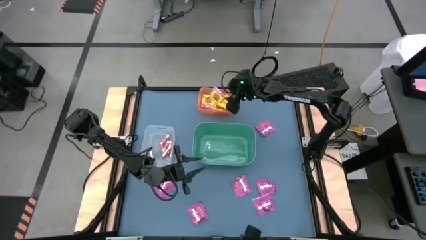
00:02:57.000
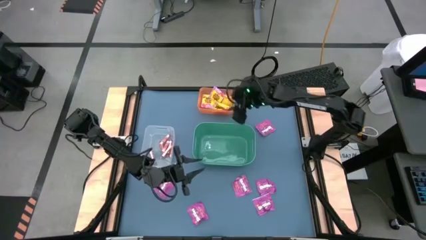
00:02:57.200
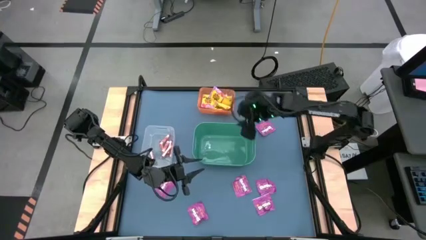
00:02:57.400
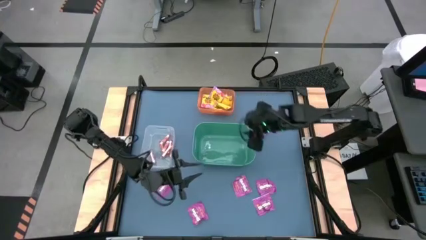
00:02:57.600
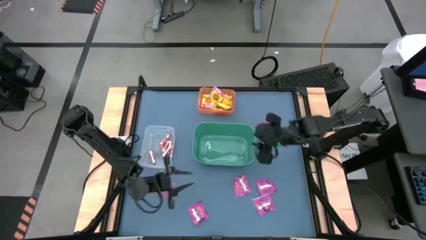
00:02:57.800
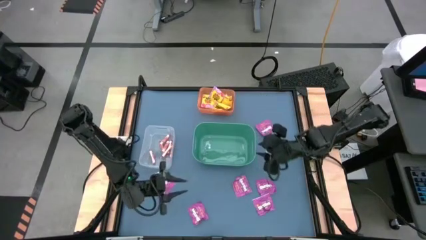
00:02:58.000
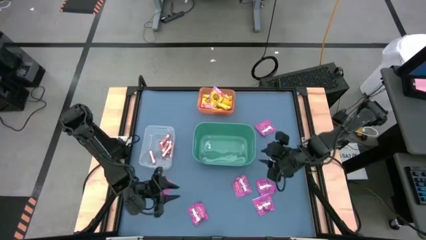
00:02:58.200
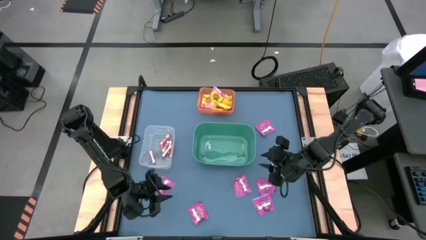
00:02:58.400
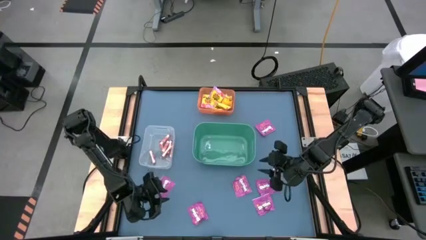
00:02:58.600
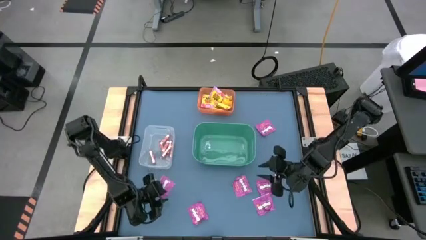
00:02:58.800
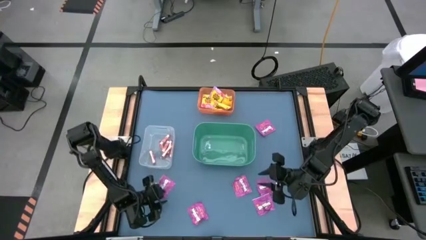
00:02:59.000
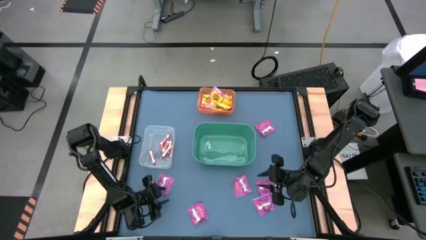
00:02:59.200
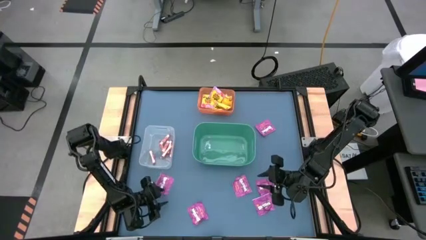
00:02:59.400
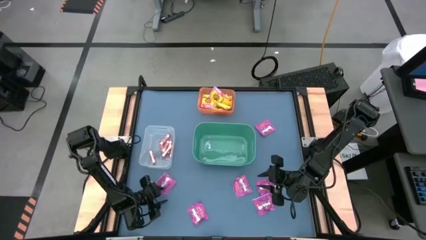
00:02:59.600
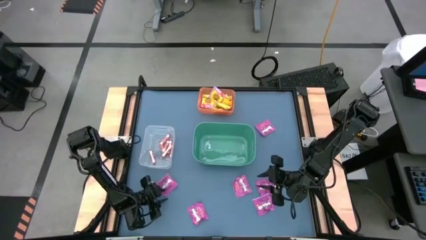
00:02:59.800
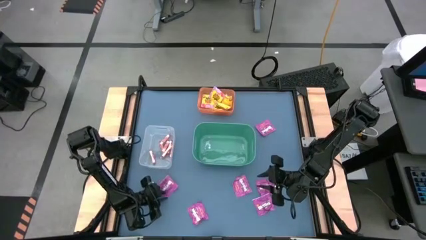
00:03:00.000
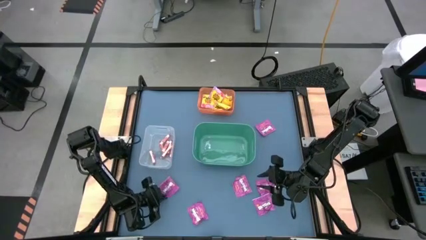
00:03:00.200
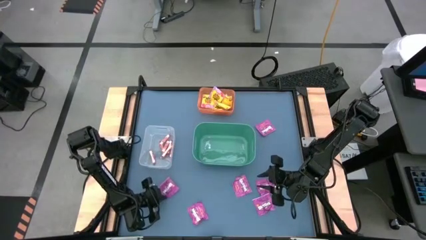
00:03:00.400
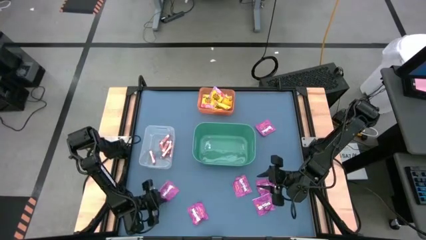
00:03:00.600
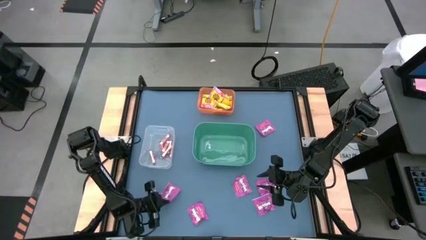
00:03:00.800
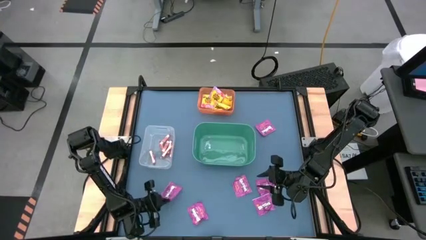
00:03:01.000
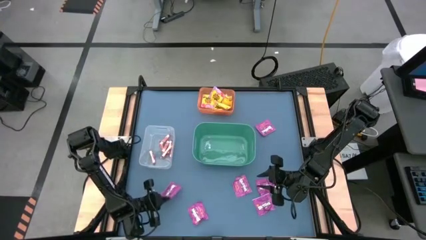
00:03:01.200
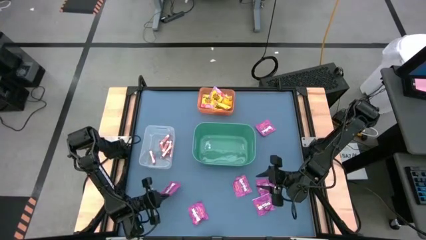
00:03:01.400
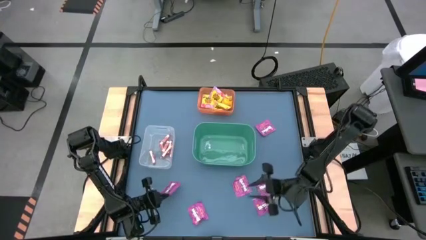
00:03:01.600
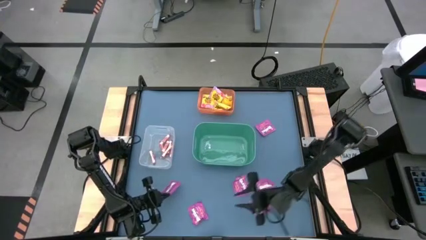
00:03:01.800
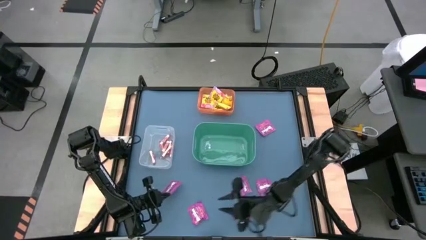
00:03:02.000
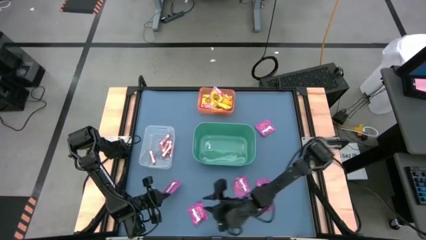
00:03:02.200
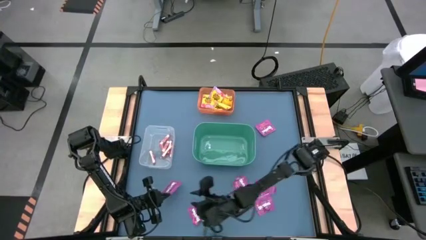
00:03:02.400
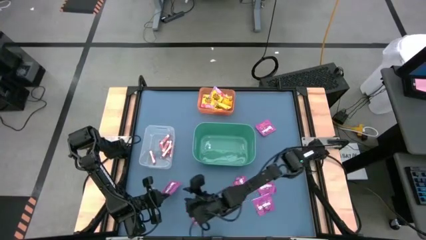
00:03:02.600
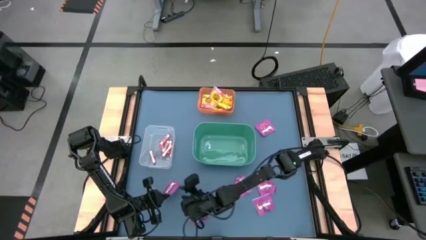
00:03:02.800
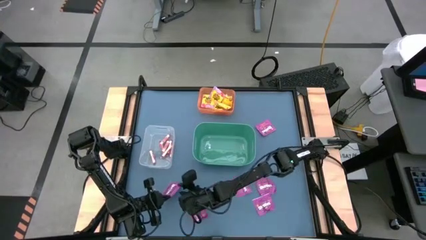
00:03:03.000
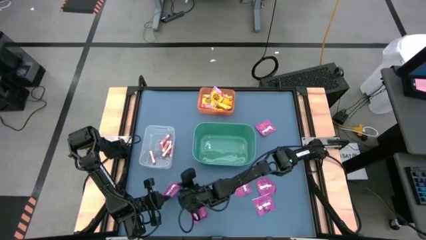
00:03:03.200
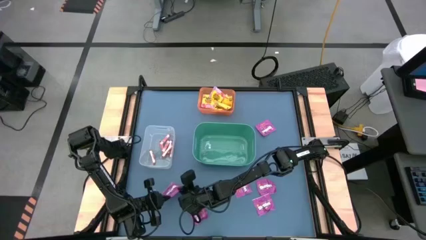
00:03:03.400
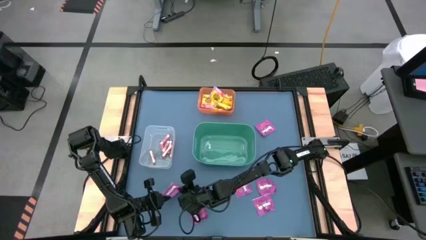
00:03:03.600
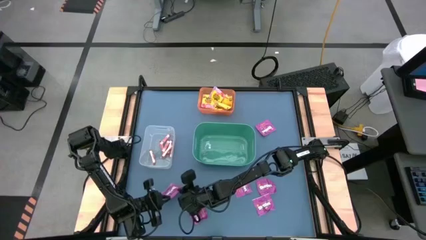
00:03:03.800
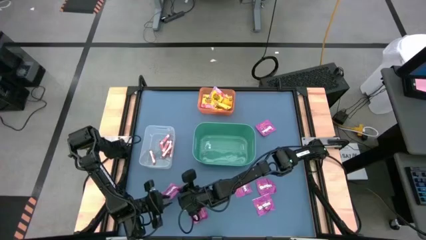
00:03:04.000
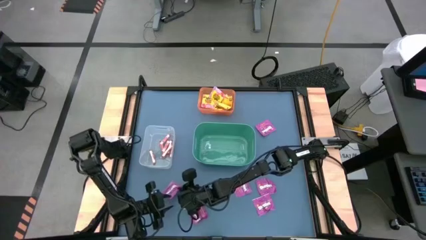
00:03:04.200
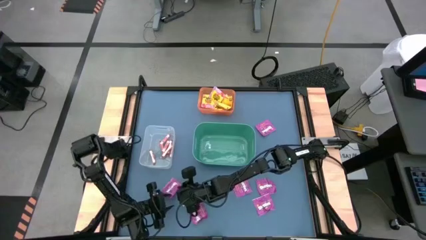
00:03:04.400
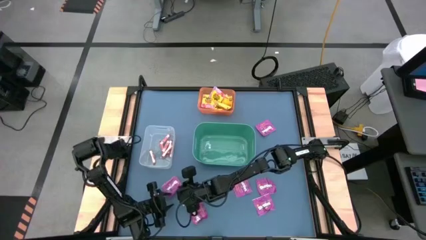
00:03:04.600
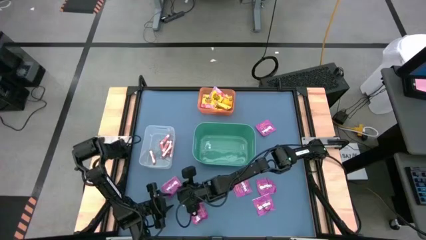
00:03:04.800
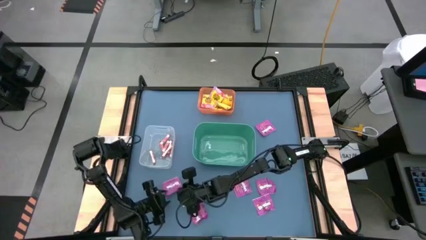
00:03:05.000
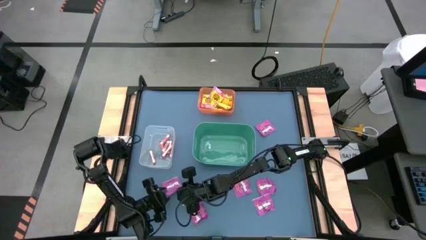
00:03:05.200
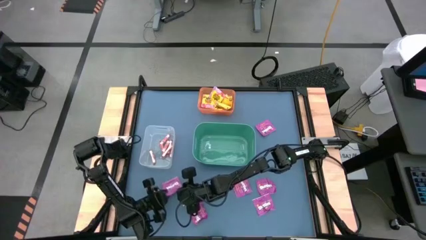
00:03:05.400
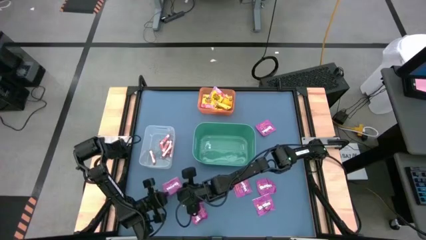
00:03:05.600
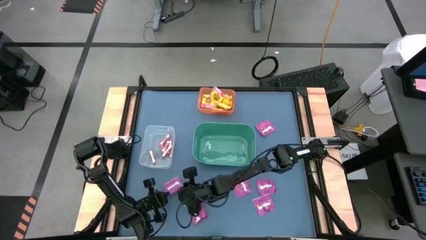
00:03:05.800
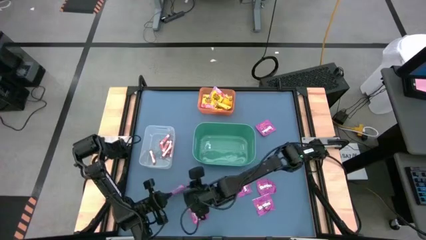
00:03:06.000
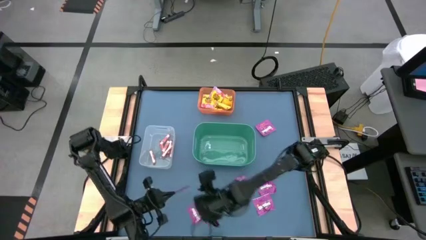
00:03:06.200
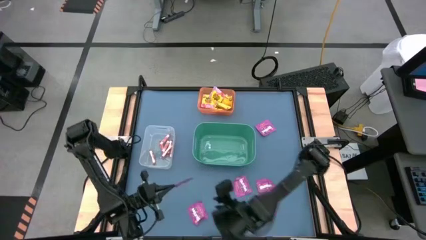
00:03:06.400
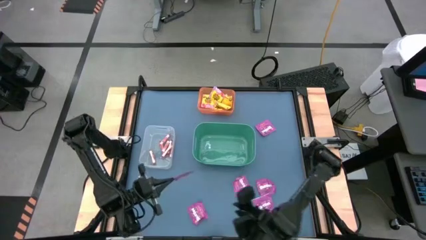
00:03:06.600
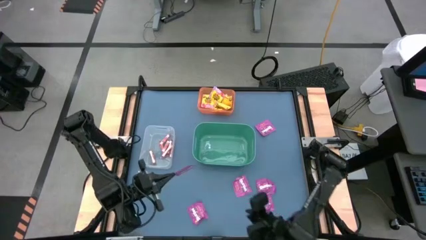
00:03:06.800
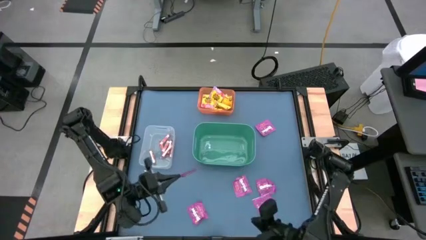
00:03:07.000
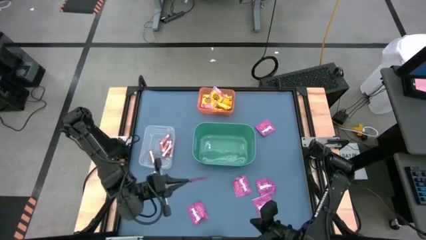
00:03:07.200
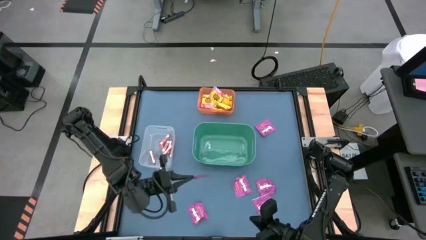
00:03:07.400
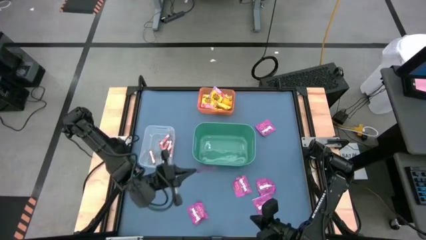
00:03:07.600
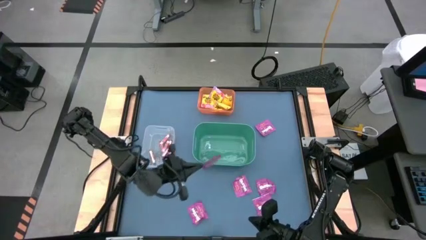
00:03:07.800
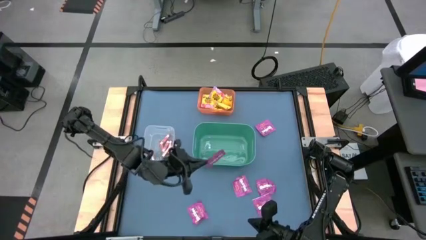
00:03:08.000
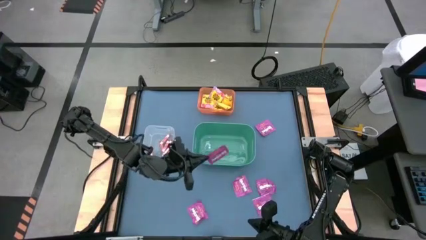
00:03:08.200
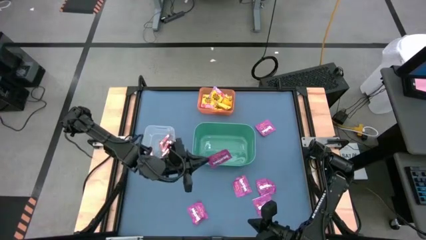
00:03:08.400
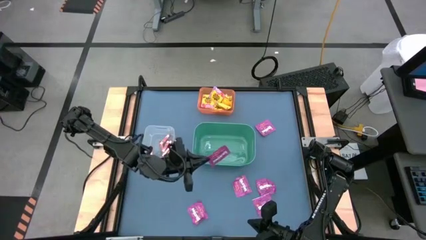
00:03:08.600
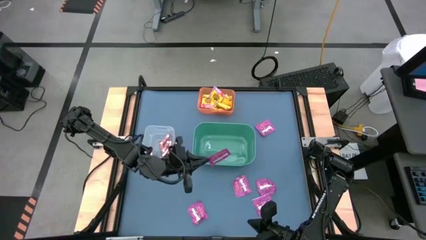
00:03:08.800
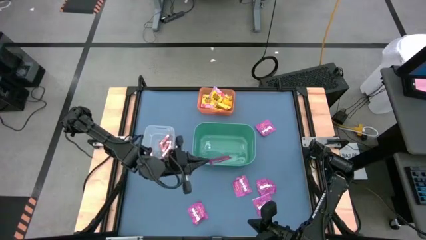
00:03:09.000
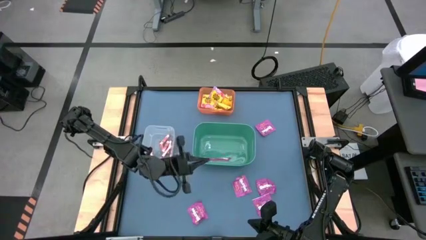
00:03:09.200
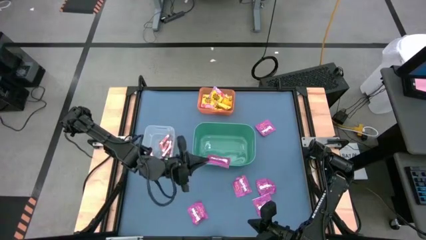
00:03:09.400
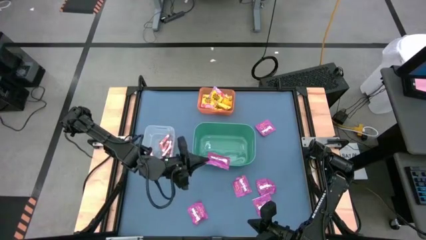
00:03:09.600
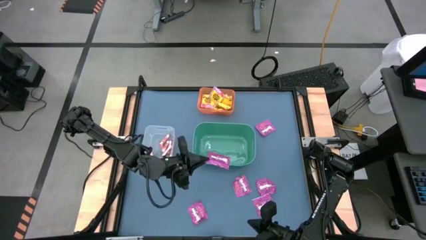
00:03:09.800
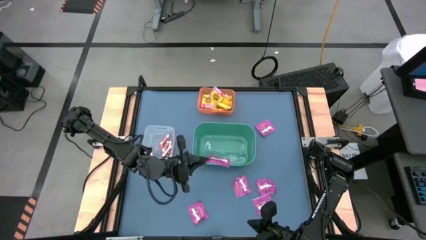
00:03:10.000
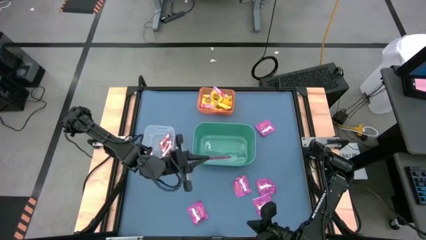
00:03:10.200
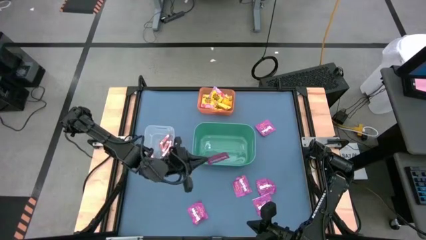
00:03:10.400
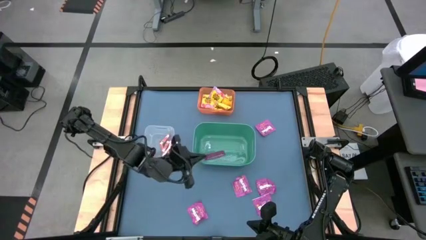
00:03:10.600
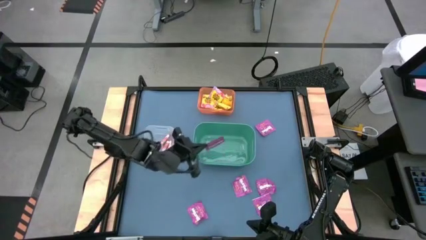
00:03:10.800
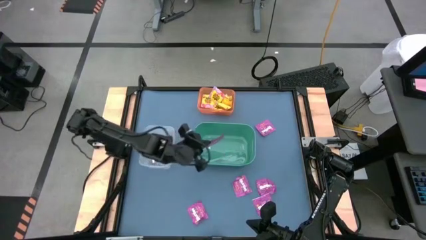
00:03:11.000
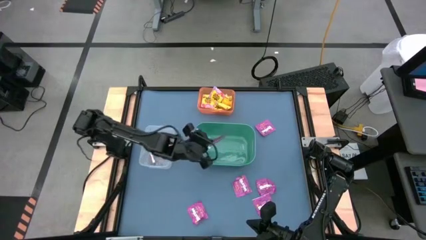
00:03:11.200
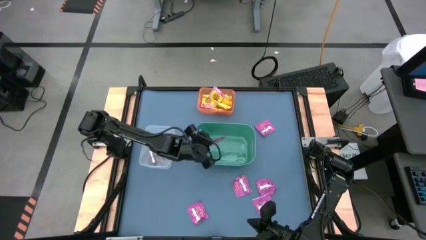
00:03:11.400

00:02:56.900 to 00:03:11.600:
Task: Sort candy
Put the purple candy into the green bin

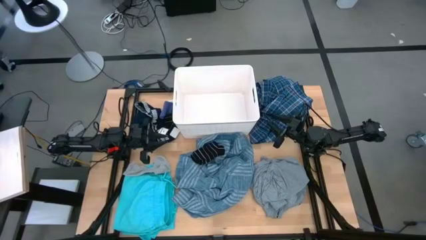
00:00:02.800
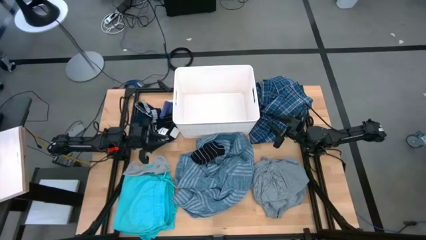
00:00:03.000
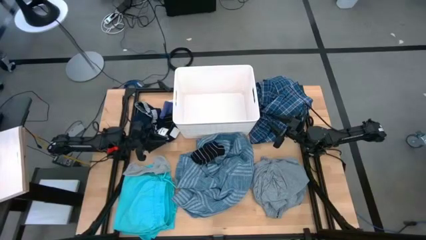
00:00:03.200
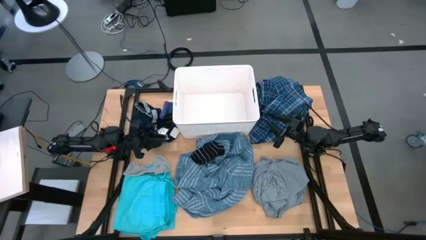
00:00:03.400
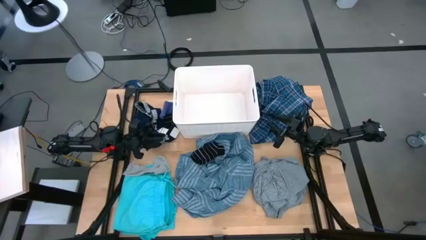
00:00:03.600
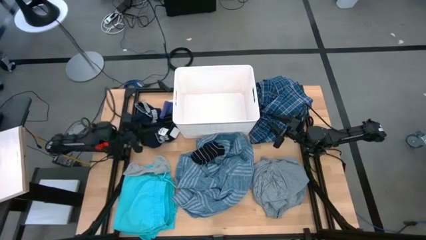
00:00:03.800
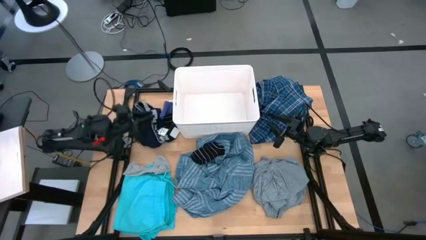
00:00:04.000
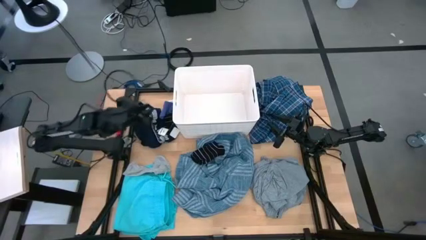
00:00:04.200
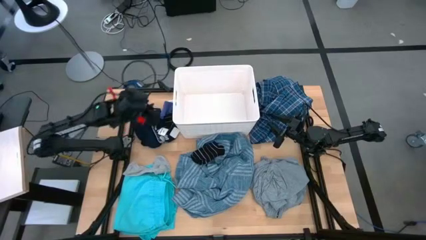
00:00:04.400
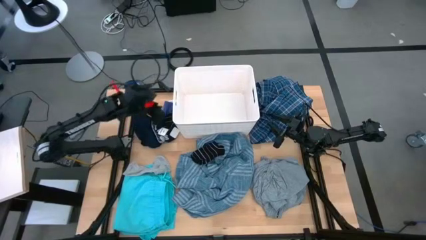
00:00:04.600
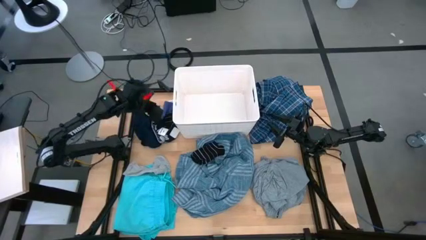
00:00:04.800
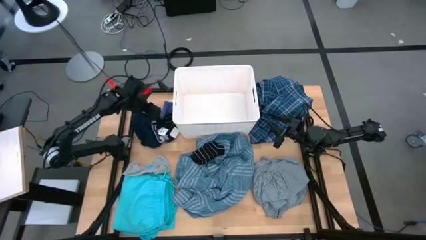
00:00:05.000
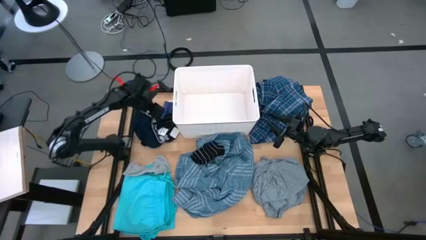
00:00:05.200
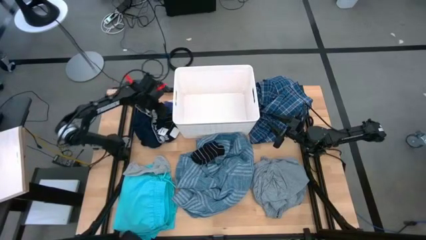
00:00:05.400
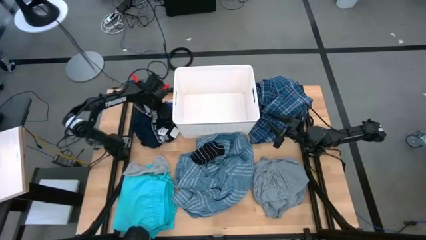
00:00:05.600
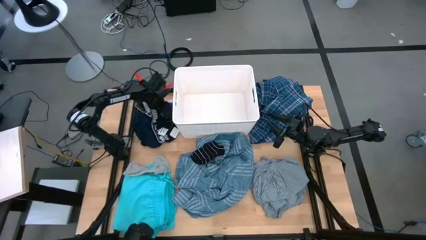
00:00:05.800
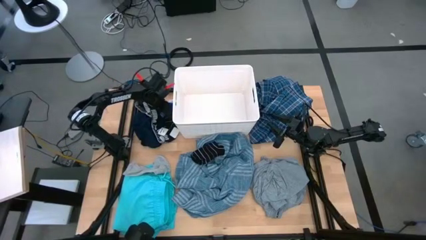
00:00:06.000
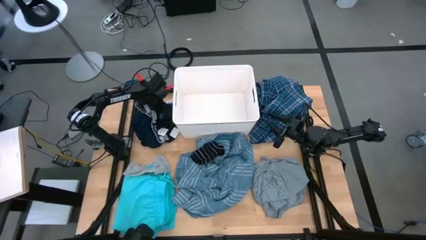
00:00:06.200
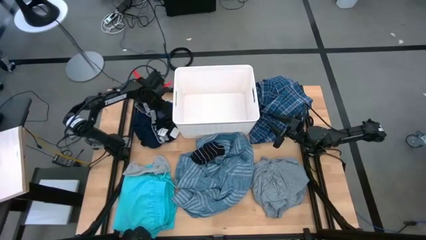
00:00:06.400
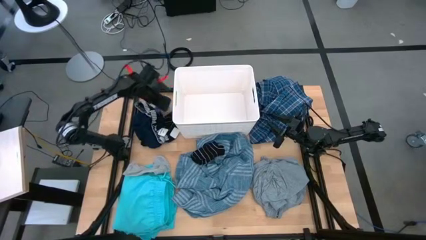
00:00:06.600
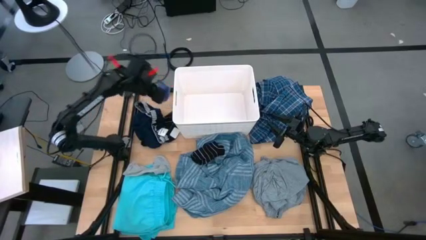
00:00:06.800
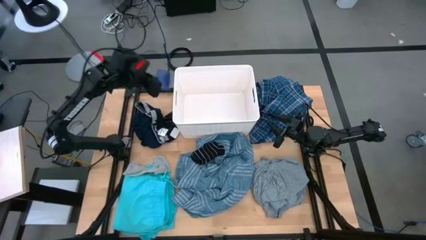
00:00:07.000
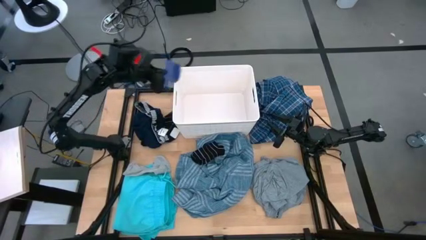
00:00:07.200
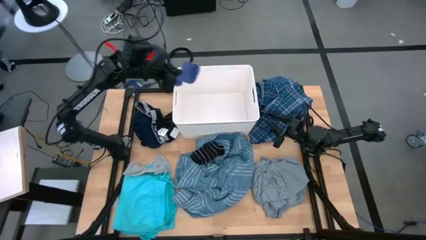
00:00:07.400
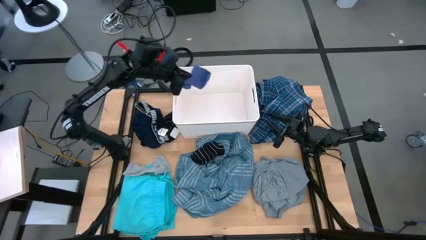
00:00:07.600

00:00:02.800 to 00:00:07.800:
Task: Sort clothes
Put the blue sock into the white laundry bin
